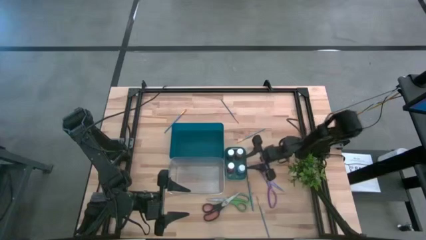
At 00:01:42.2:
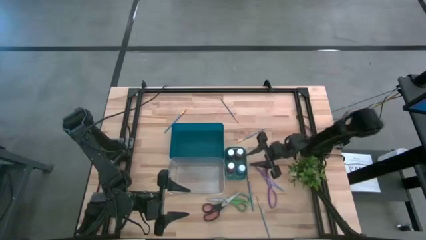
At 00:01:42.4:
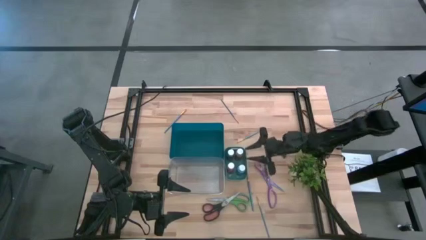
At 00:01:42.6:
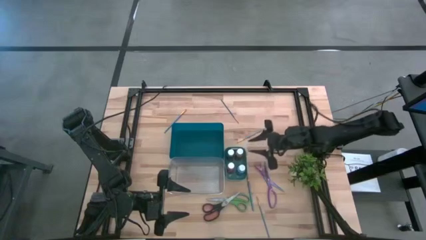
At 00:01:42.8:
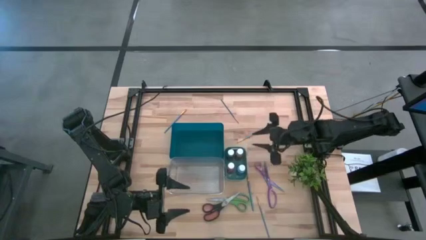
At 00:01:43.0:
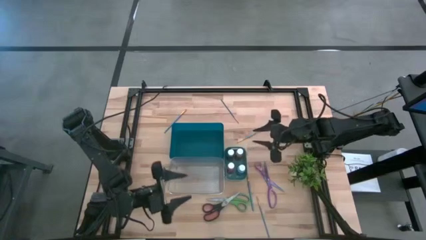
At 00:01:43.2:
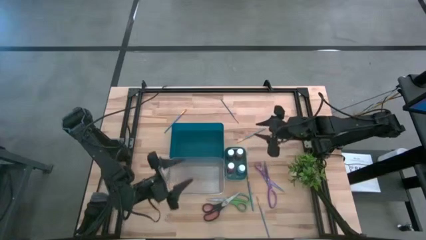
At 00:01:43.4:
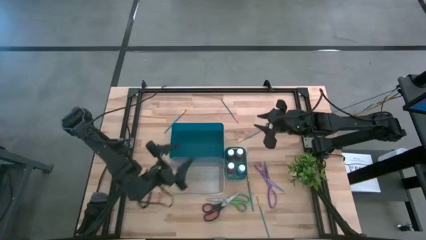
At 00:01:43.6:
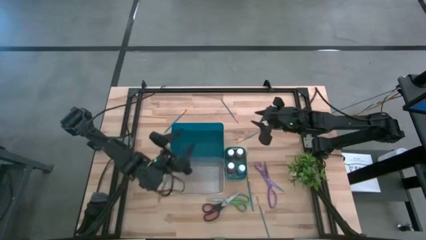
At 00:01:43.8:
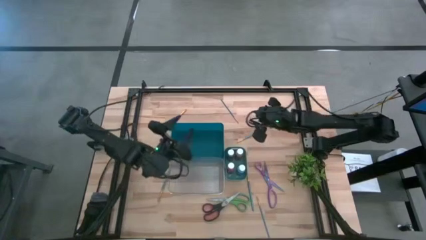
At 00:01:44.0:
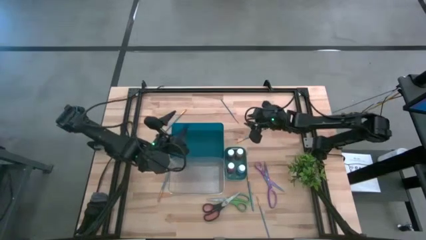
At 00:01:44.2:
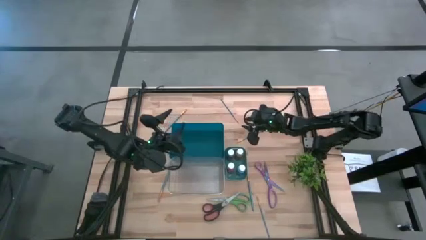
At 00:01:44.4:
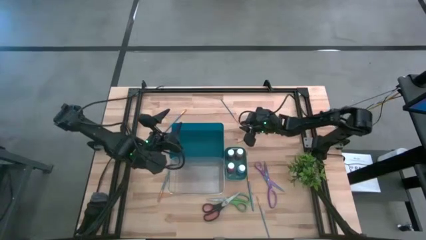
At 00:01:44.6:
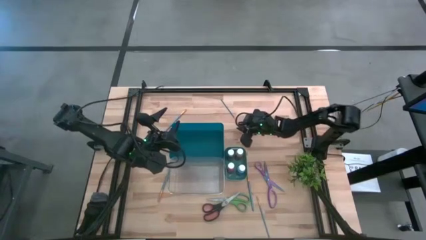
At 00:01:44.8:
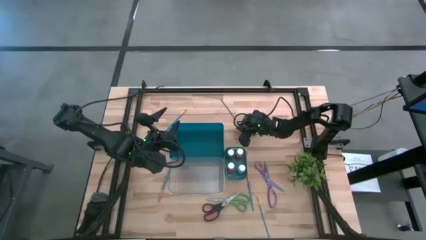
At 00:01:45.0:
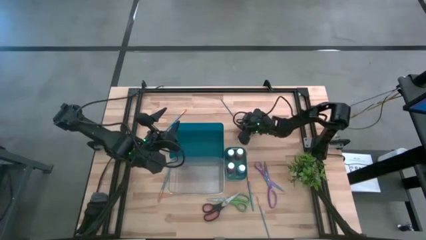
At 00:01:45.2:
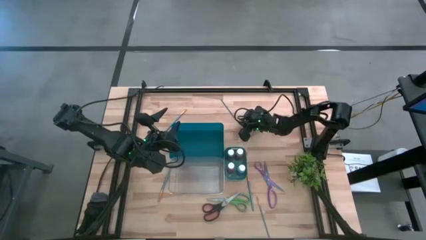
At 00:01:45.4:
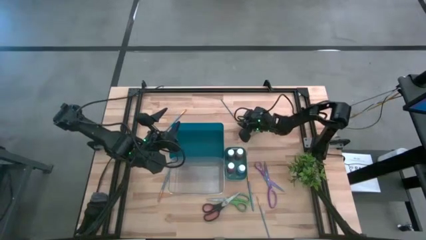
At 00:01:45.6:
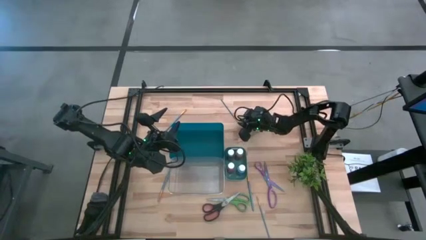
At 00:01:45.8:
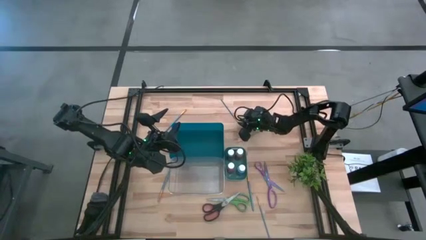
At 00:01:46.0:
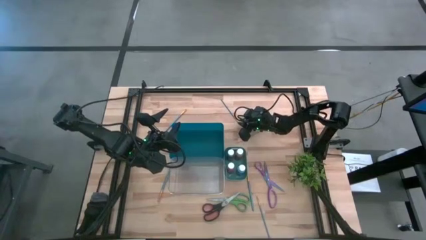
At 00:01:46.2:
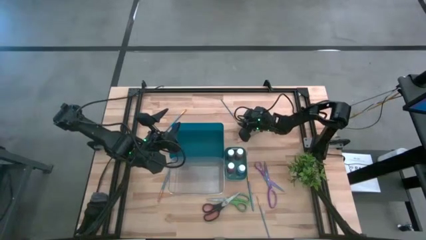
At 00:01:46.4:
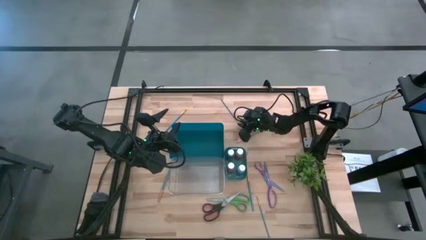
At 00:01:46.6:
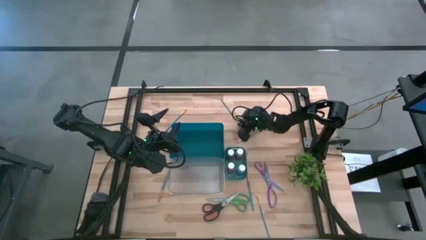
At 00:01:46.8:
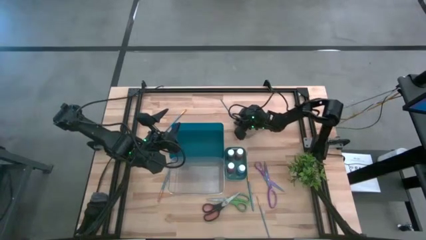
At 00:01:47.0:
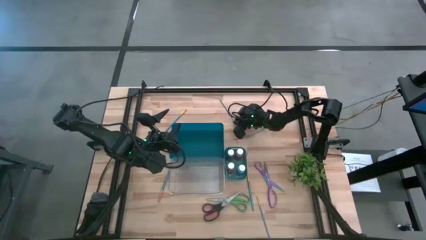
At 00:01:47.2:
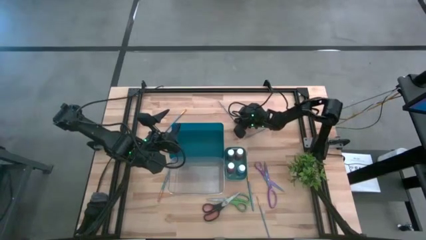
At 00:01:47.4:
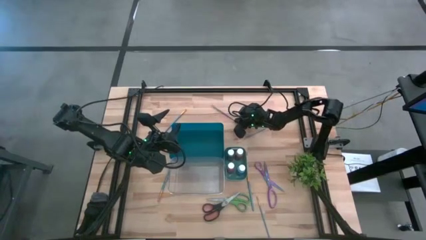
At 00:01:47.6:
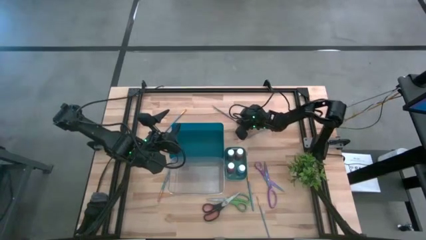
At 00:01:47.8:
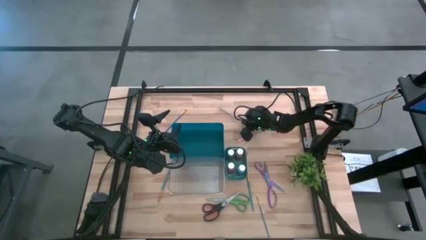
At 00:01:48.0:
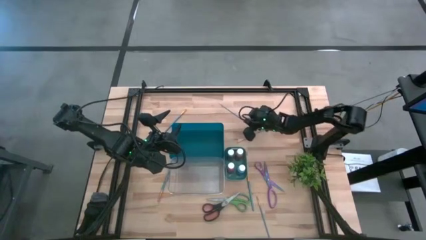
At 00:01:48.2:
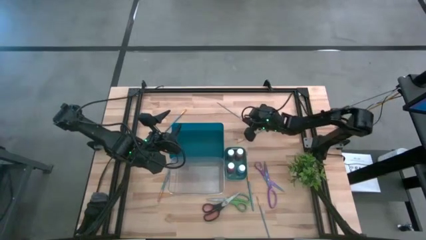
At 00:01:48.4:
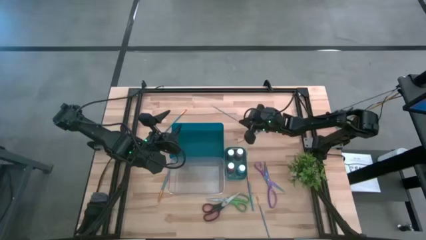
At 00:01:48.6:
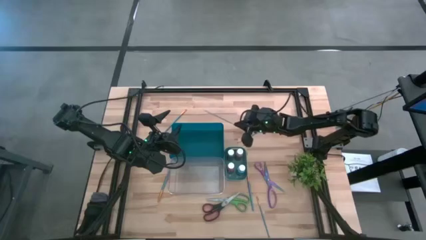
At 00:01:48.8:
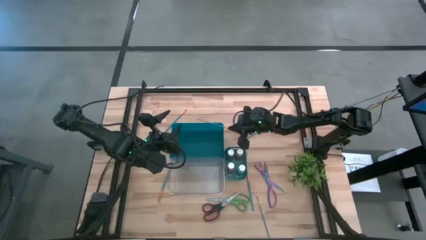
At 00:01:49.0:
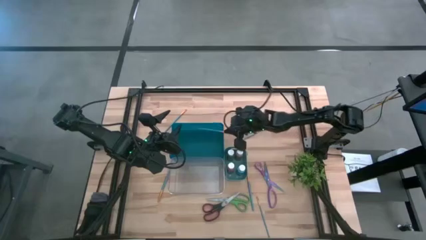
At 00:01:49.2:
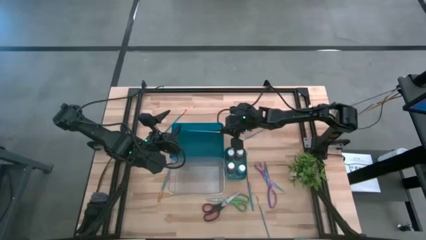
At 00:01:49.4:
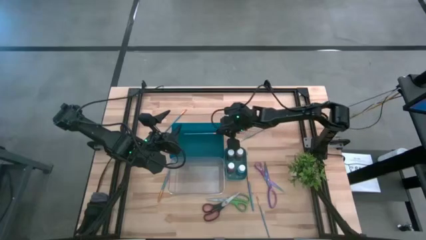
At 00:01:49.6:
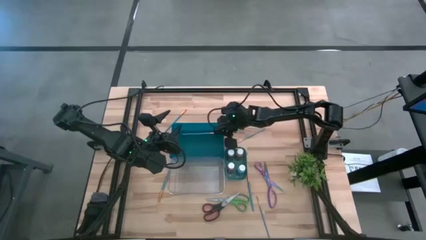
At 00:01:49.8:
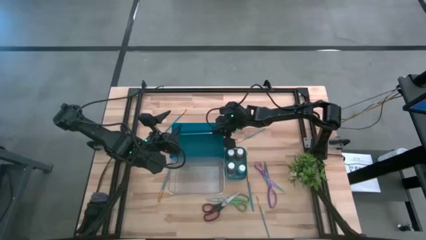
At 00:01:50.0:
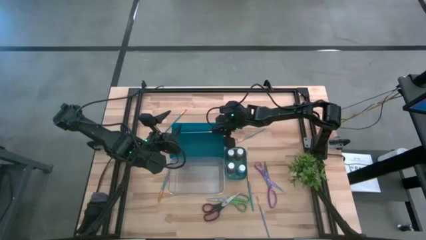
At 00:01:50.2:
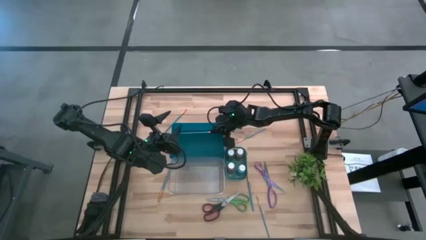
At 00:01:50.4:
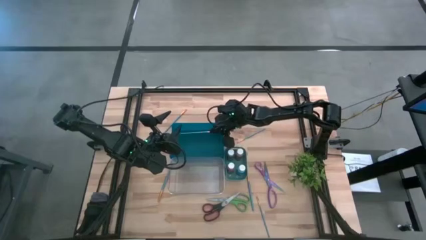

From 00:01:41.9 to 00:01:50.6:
Task: Pick & Place Paint Supplies
Put the blue paint brush into the blue bin

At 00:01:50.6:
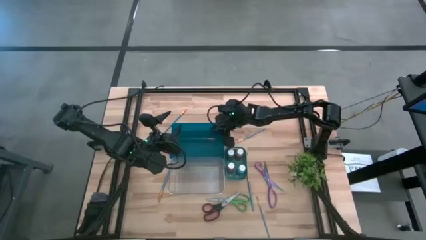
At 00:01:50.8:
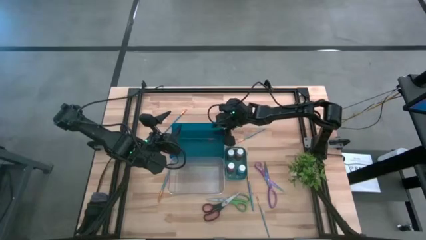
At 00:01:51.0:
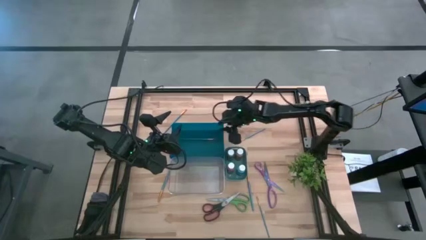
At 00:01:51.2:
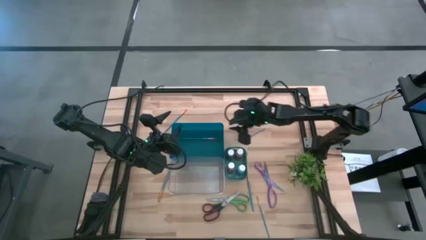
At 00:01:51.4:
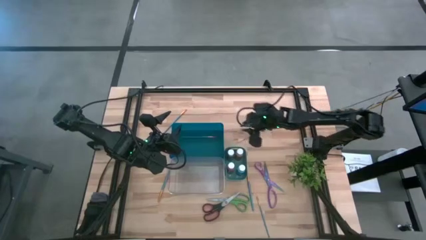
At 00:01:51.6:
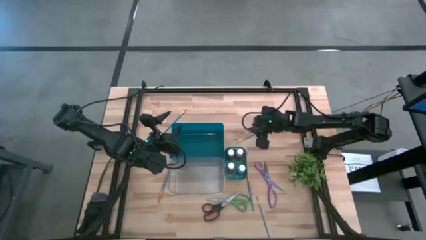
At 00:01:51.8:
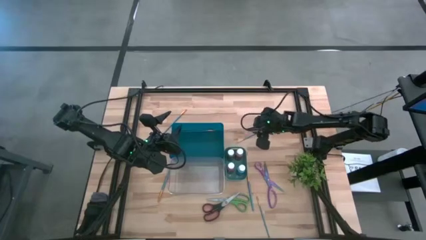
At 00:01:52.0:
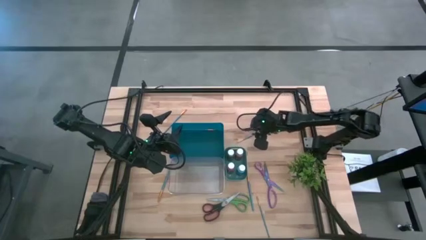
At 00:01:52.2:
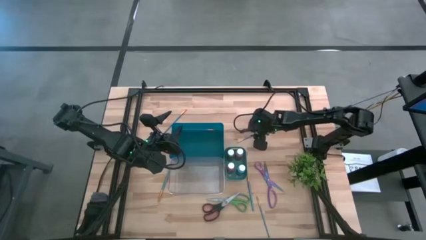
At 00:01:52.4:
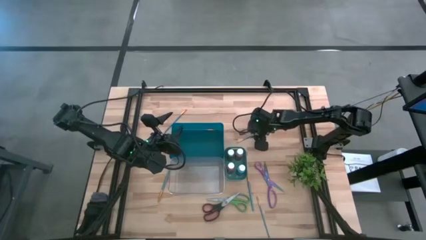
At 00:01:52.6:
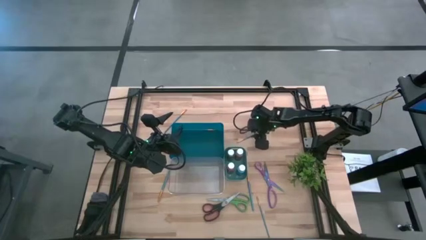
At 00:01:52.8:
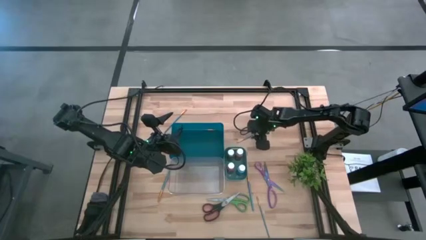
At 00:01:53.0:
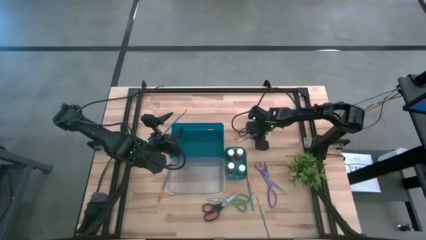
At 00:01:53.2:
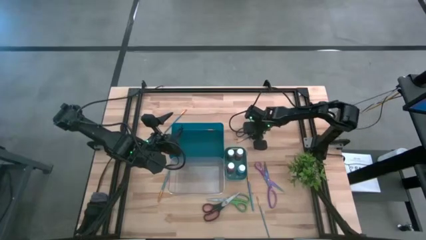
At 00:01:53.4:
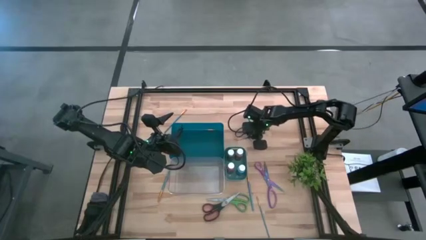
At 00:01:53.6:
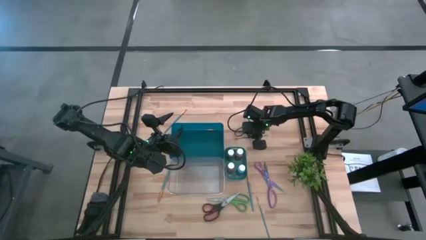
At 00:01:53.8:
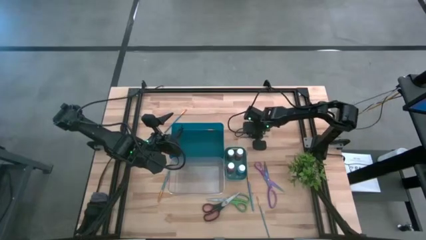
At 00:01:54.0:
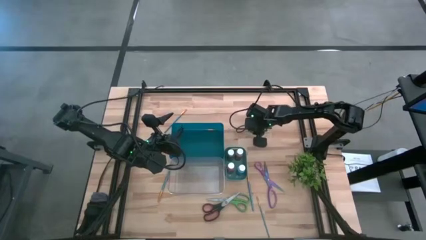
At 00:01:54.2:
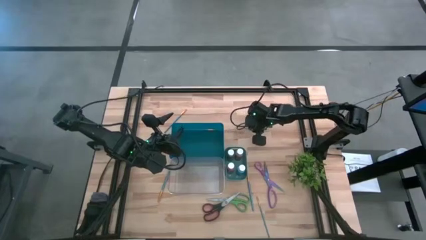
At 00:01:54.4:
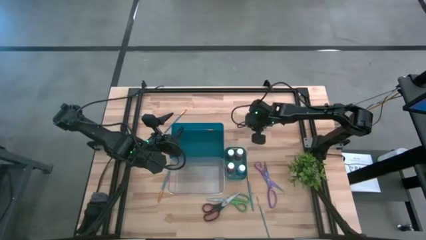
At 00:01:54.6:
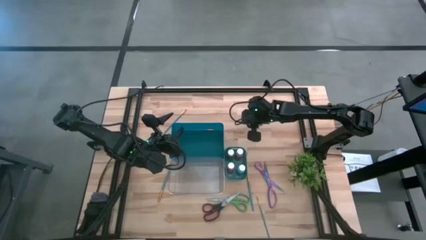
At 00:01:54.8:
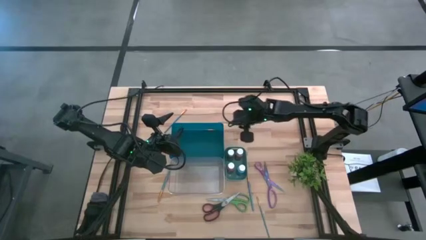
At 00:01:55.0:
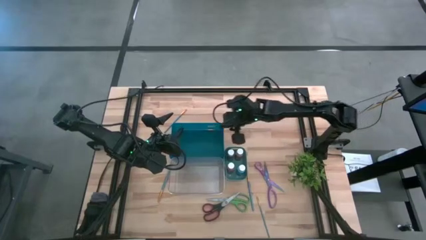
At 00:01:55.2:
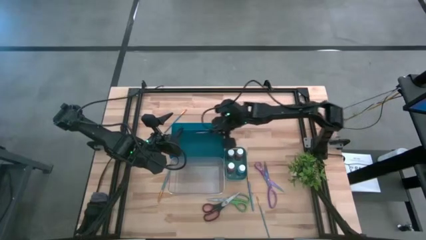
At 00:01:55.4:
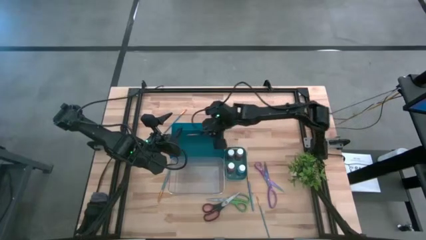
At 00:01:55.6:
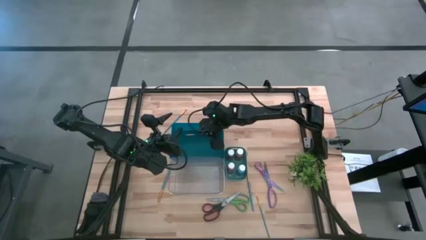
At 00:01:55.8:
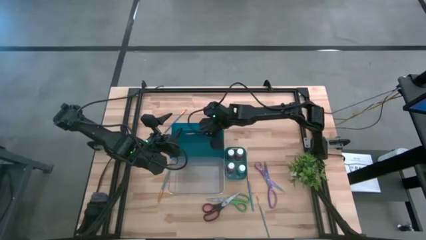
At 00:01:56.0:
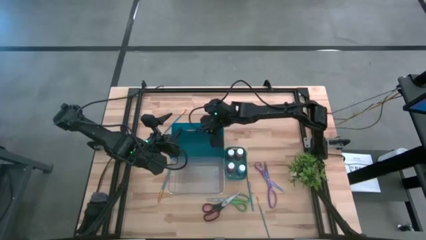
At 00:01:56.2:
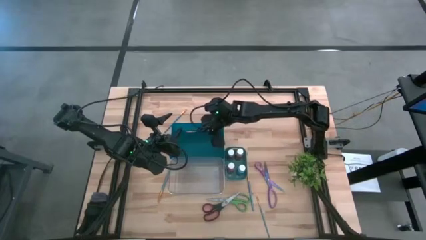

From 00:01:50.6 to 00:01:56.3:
Put the blue paint brush into the blue bin
